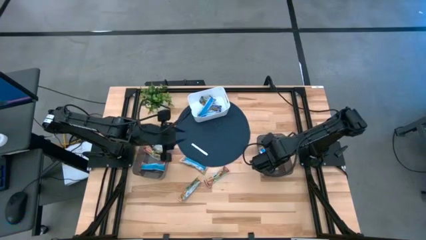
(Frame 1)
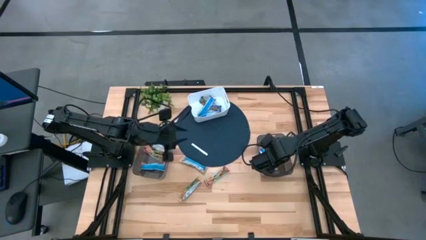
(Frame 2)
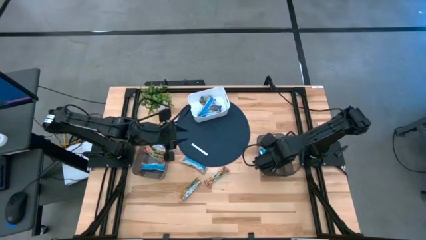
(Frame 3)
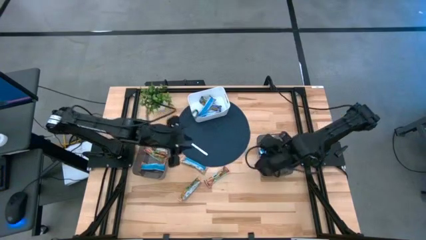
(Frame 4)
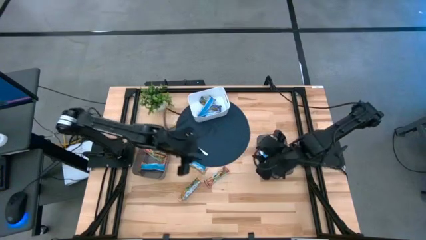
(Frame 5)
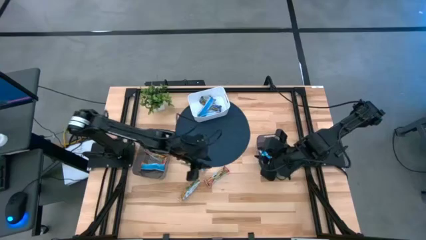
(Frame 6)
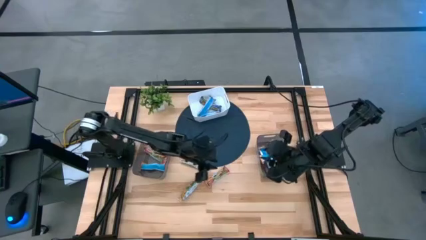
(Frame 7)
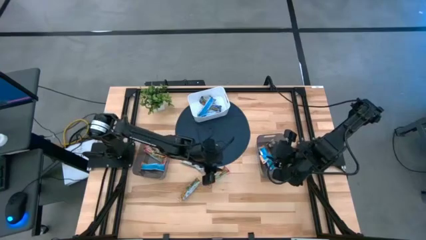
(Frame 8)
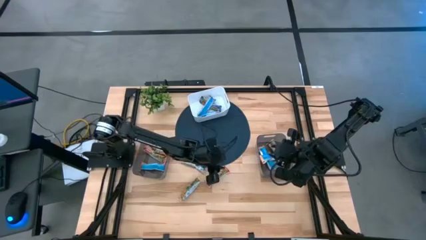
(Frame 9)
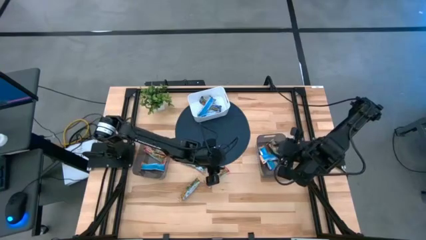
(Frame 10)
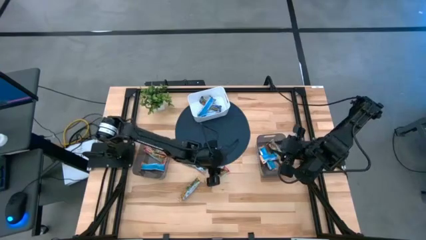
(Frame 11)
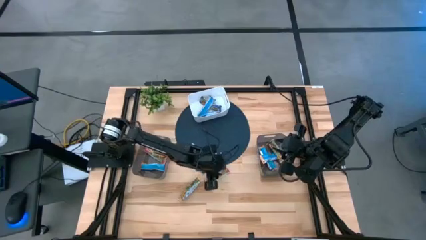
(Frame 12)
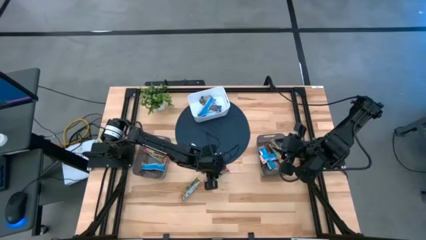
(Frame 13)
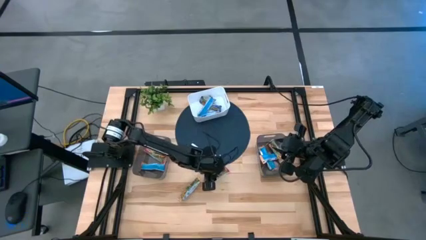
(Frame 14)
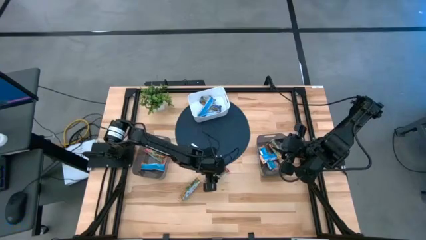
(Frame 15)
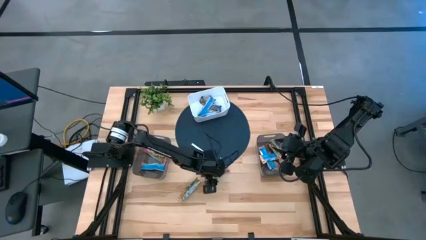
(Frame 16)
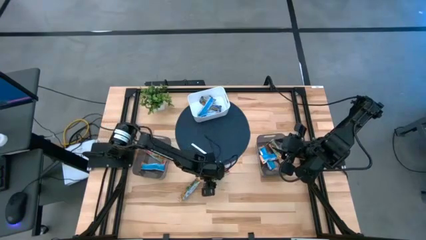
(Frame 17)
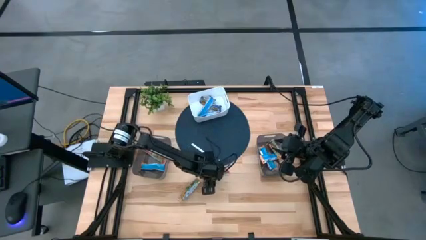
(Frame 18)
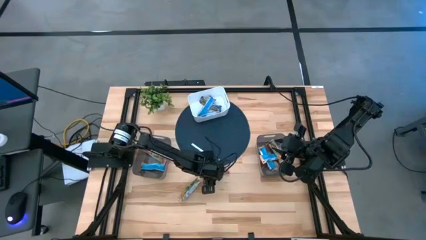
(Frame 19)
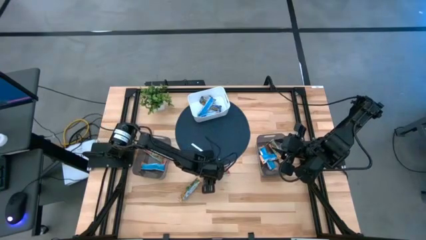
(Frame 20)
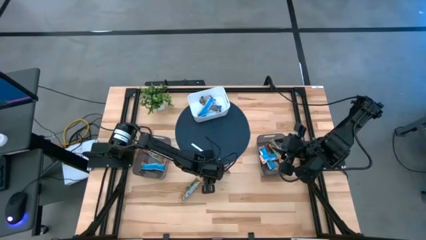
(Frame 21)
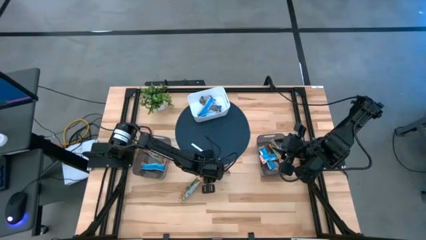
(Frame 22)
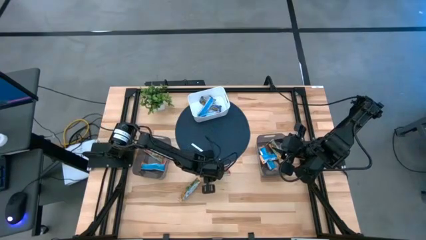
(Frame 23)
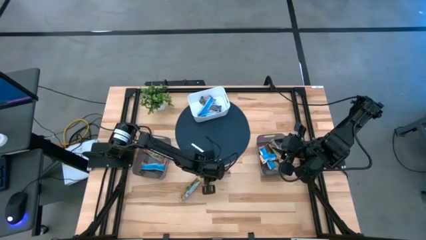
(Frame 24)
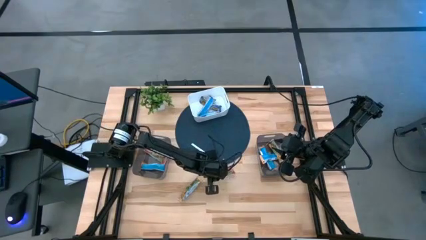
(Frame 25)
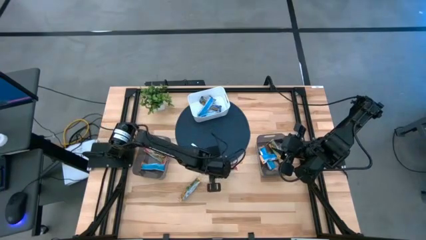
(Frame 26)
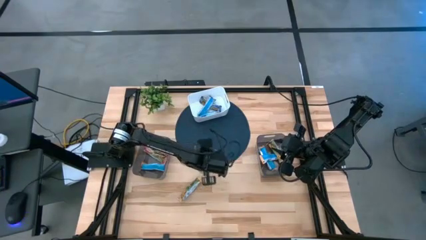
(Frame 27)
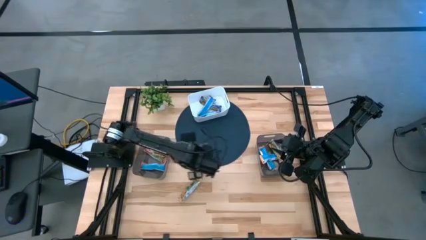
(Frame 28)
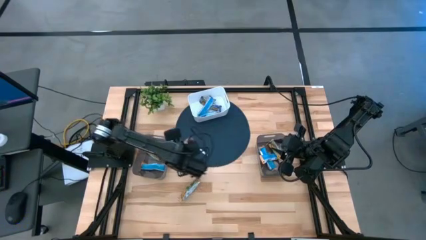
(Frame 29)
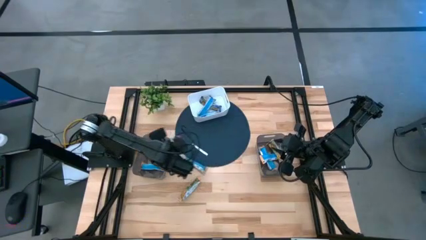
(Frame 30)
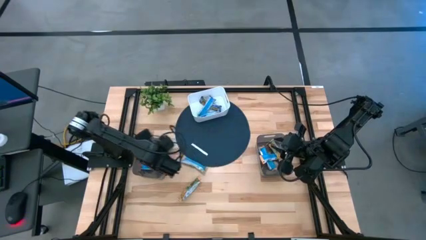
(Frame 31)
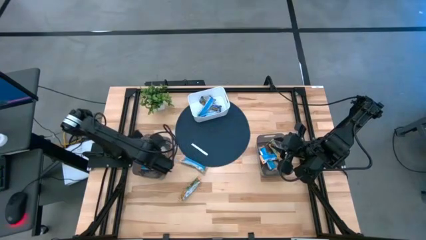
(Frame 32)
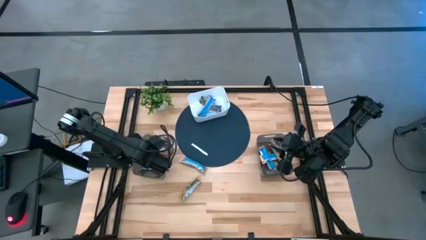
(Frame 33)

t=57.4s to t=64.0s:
Task: Pick and place Granola Bars by type
Put the red granola bar into the left black bin

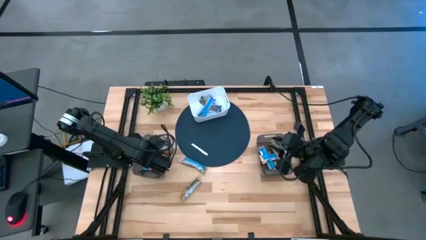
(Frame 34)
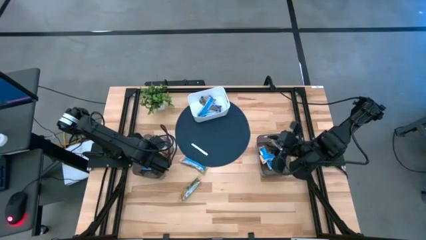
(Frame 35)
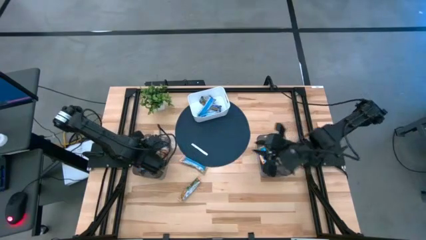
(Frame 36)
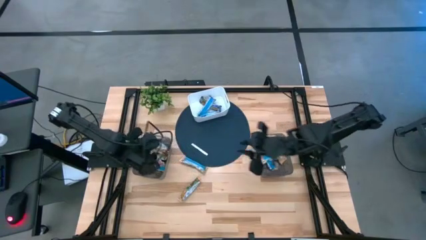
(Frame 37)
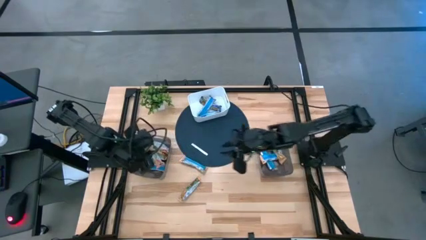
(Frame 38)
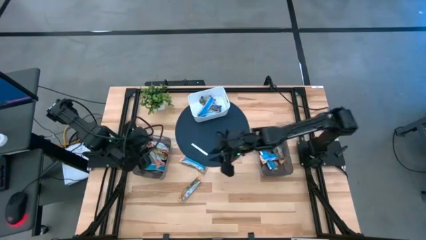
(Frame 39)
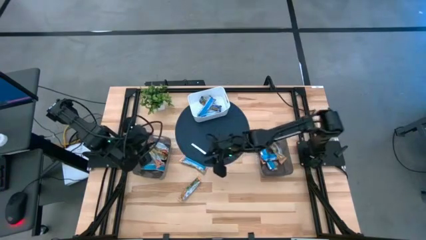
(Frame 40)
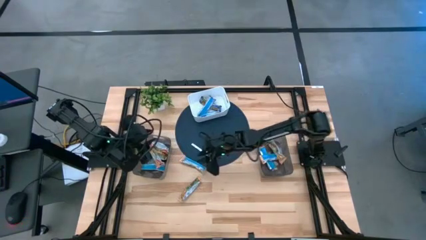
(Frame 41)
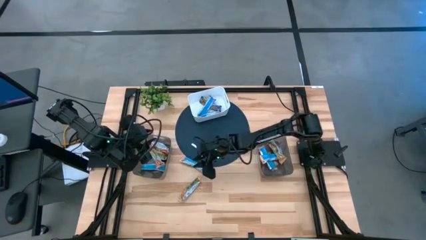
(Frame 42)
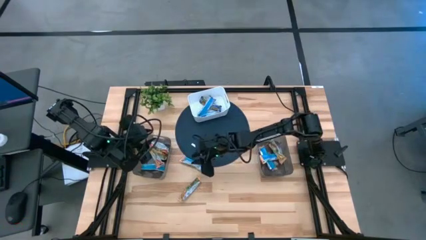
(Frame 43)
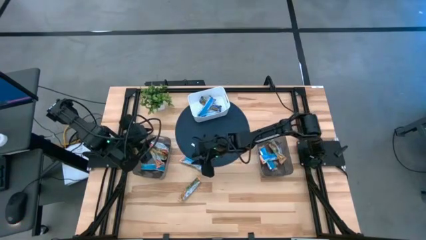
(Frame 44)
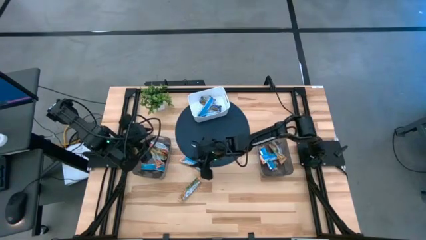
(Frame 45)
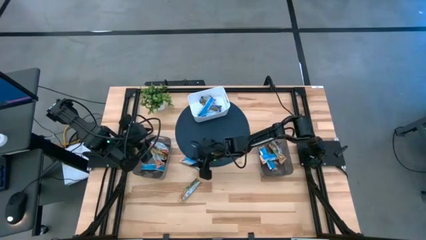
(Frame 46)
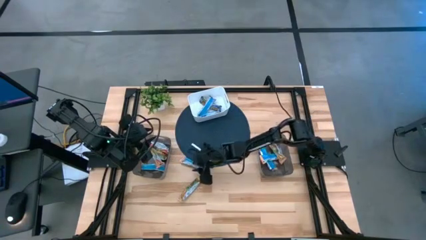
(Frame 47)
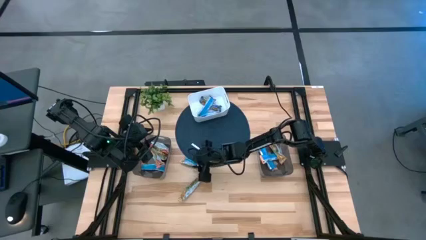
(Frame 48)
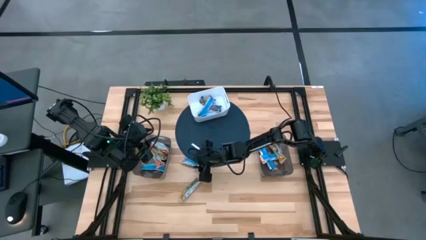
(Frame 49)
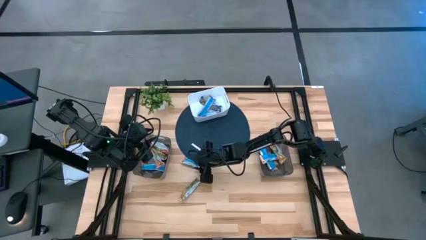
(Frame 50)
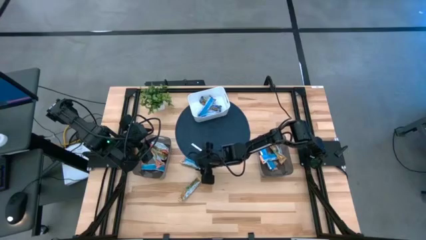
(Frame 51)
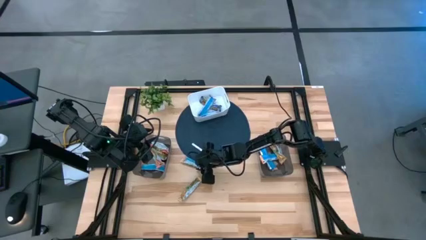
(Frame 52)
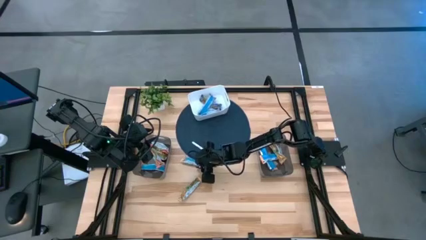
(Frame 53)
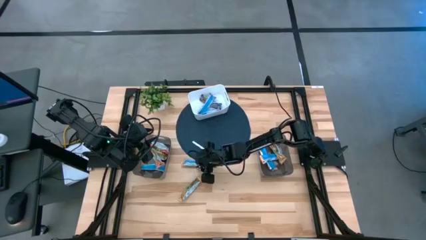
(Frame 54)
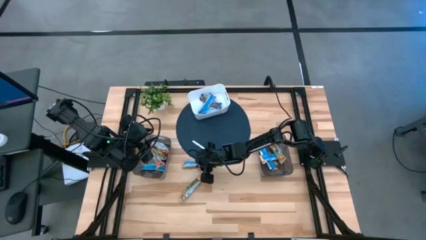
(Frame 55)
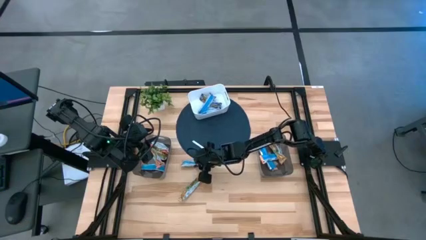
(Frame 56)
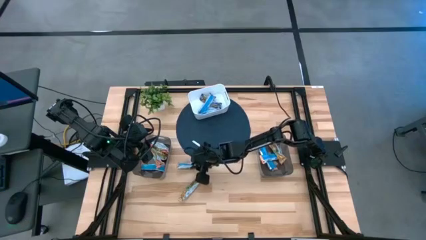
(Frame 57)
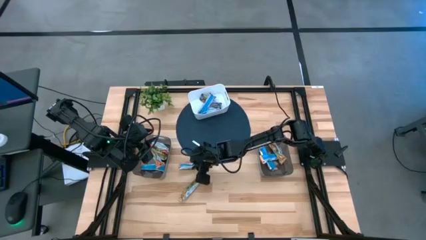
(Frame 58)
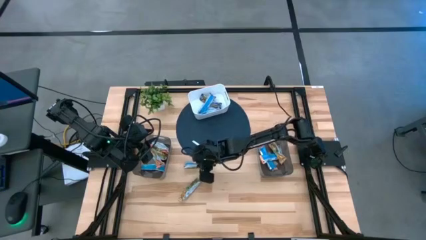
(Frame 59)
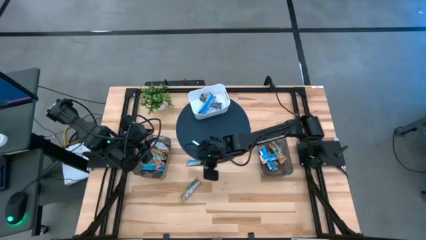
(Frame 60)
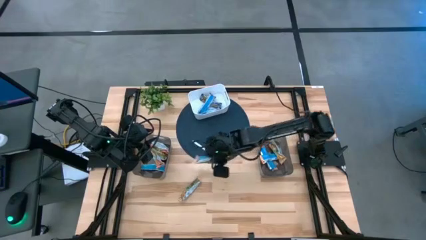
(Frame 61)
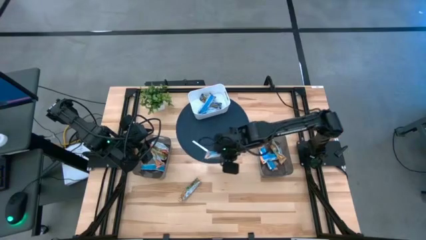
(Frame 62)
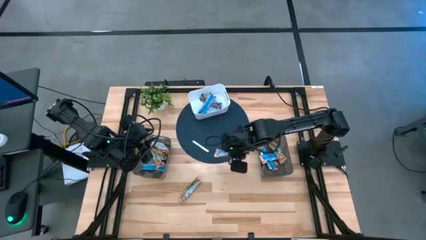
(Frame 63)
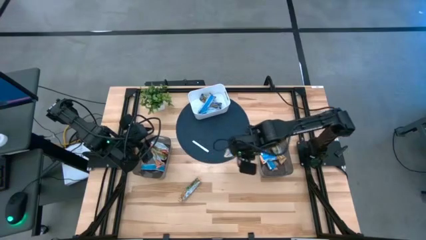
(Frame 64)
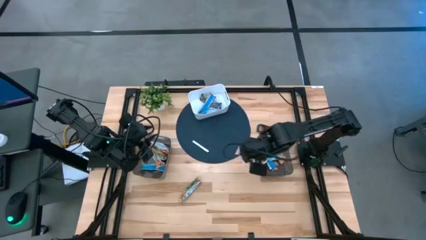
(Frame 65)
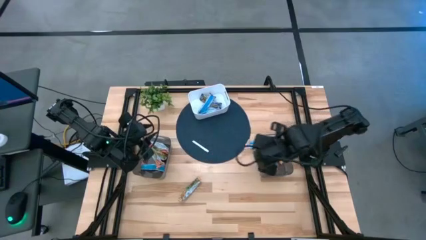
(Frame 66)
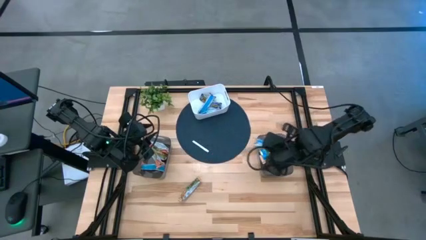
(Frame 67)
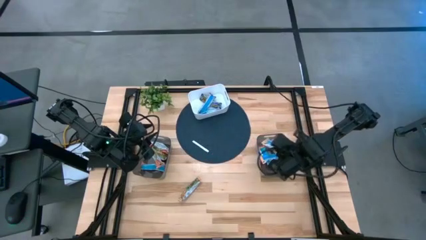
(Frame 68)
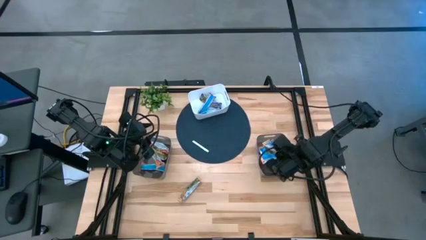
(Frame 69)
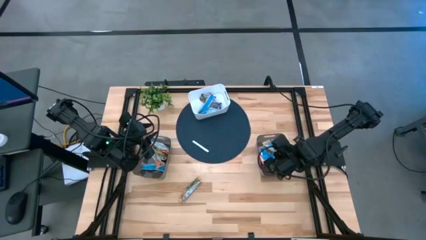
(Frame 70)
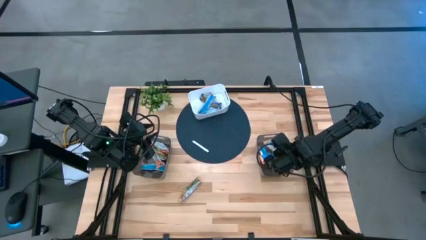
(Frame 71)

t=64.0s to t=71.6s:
Put the yellow granola bar into the right black bin

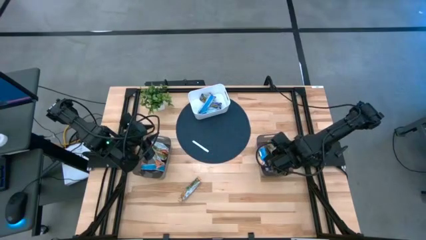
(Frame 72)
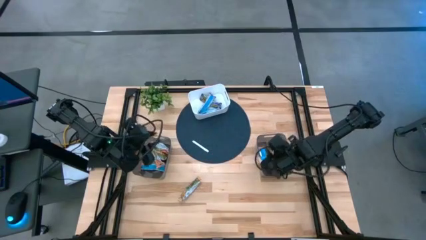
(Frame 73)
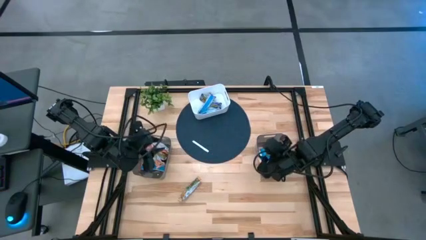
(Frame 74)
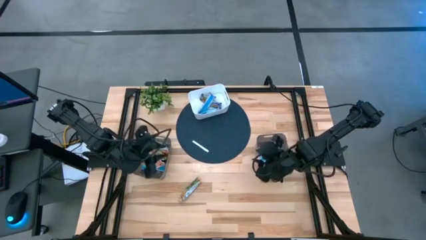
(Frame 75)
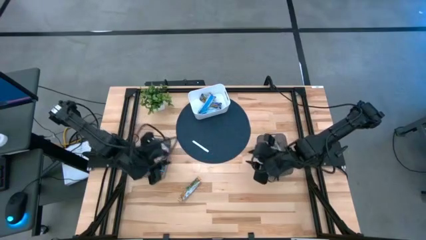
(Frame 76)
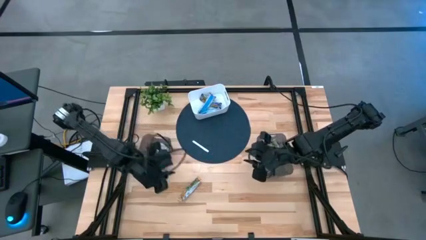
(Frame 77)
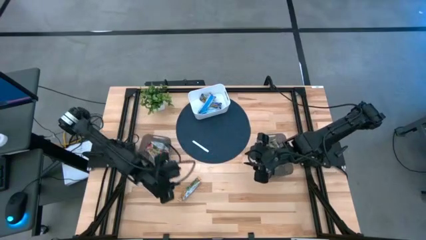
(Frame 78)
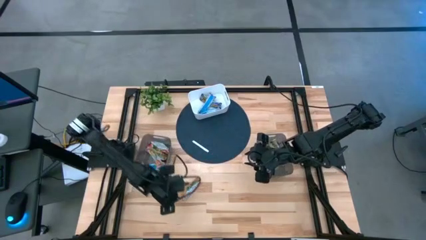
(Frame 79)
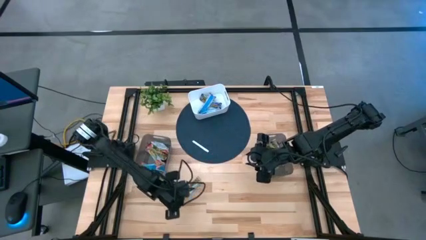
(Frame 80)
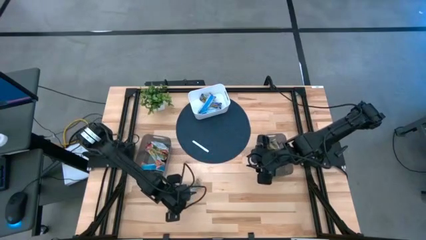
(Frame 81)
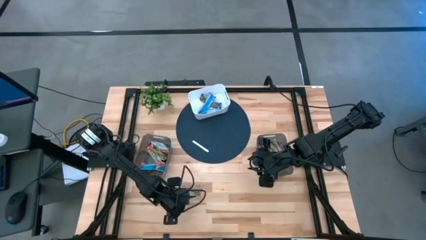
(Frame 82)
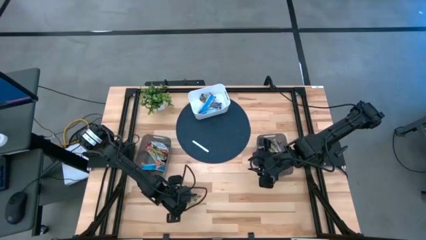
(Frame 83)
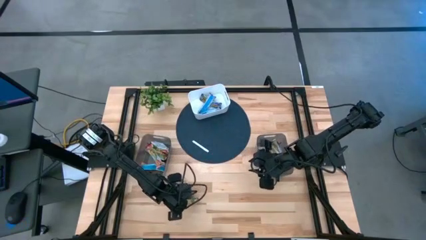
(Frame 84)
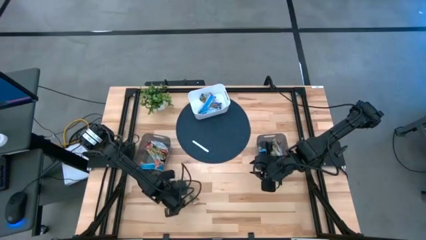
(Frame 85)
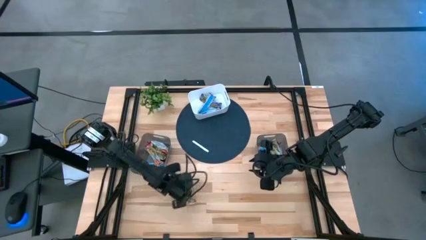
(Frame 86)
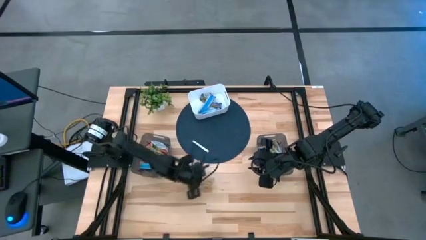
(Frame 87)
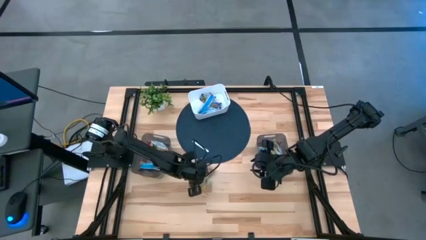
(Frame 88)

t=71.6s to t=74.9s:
Put the yellow granola bar into the right black bin
